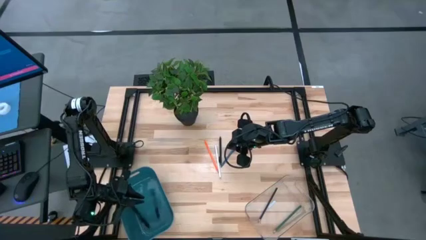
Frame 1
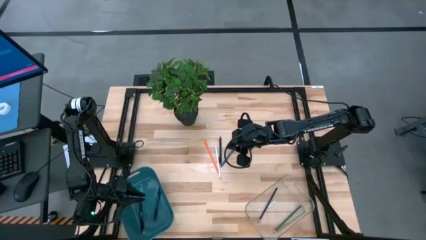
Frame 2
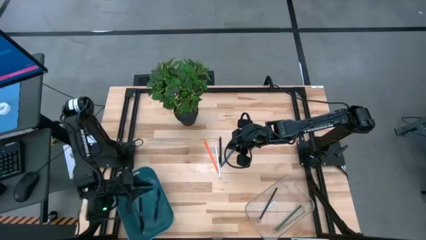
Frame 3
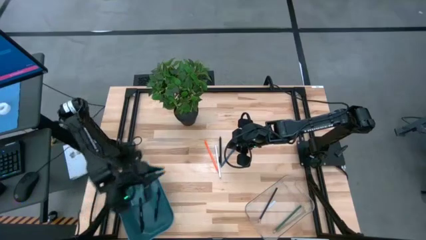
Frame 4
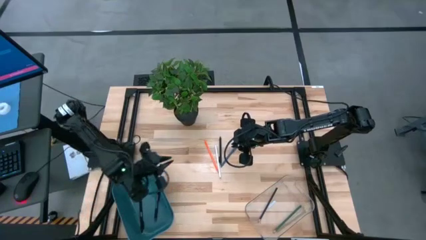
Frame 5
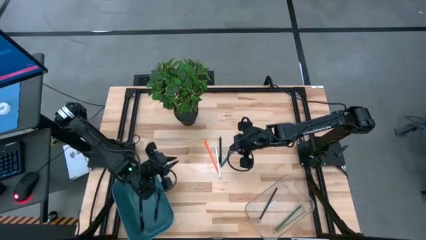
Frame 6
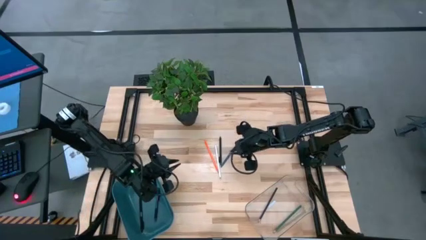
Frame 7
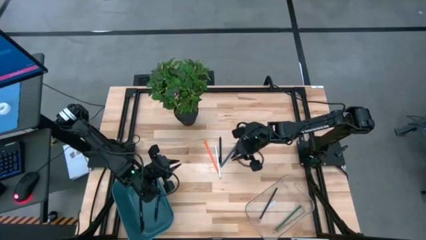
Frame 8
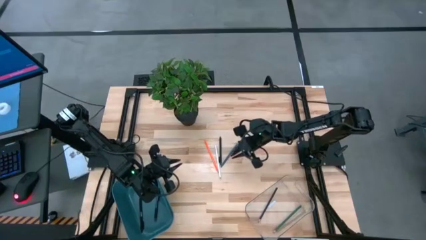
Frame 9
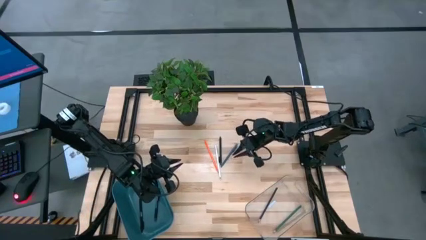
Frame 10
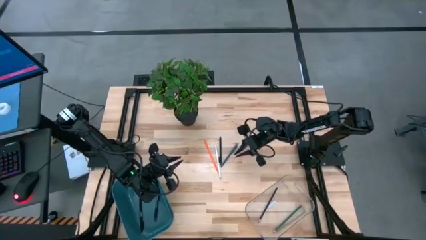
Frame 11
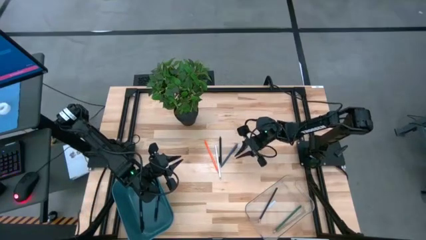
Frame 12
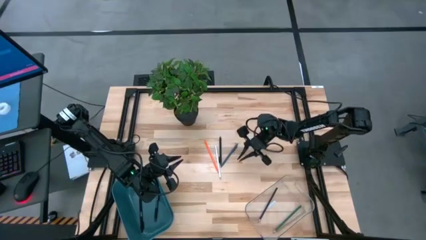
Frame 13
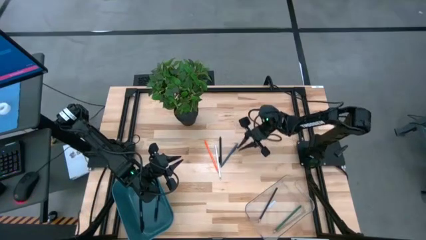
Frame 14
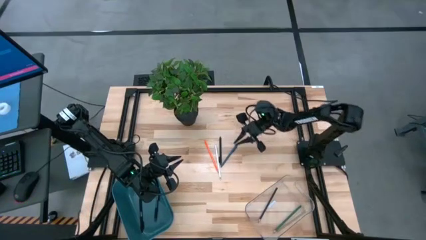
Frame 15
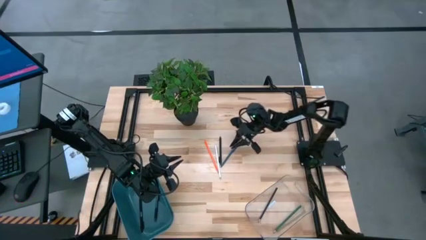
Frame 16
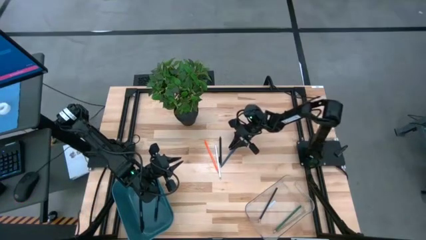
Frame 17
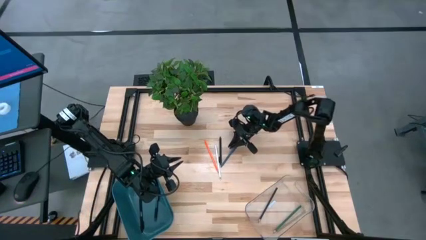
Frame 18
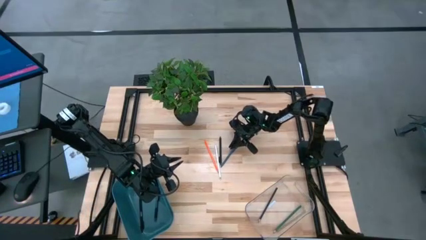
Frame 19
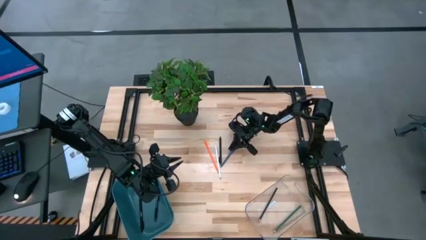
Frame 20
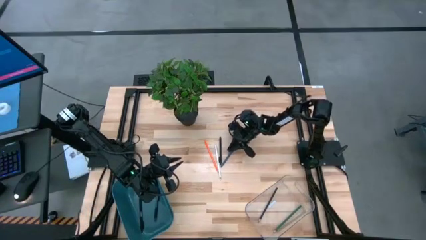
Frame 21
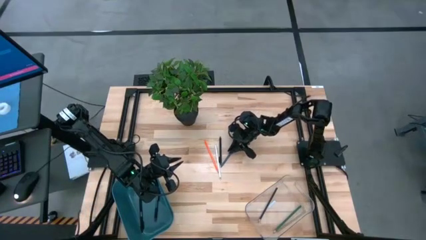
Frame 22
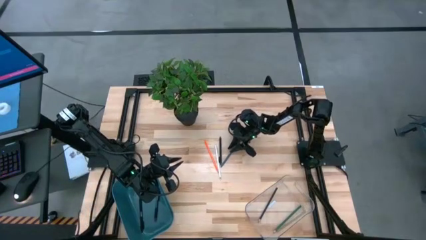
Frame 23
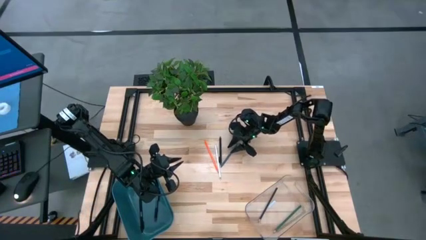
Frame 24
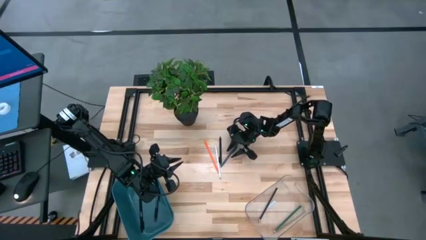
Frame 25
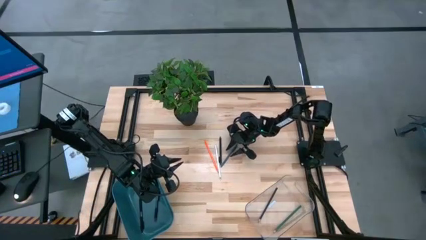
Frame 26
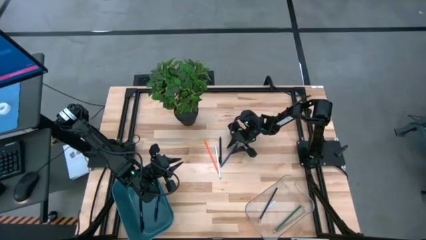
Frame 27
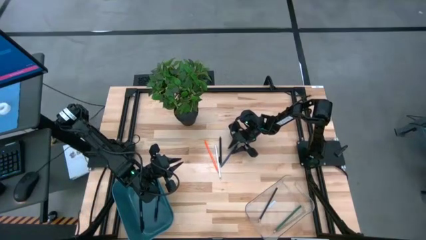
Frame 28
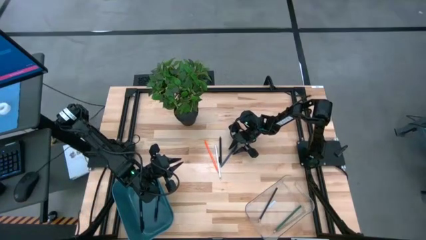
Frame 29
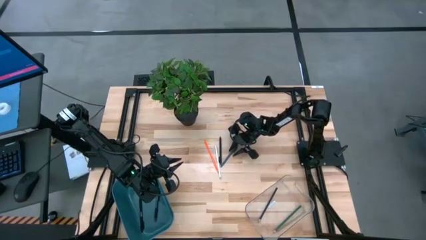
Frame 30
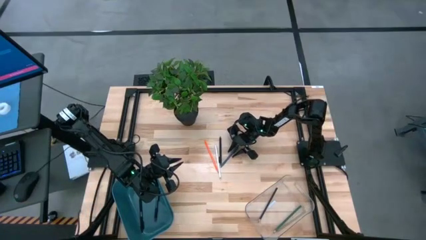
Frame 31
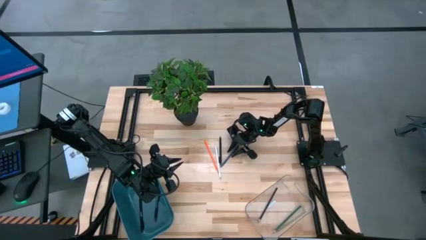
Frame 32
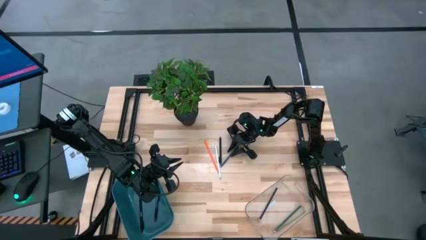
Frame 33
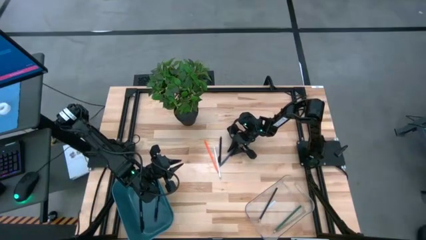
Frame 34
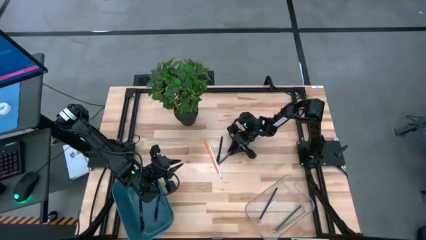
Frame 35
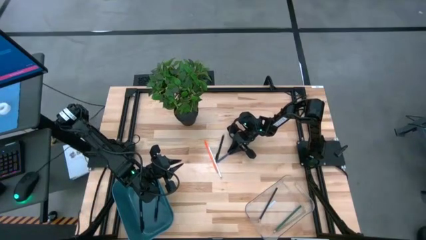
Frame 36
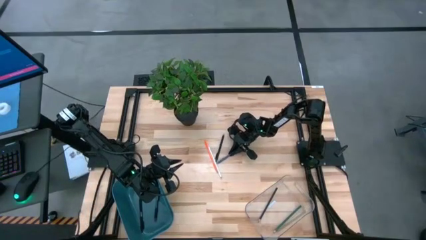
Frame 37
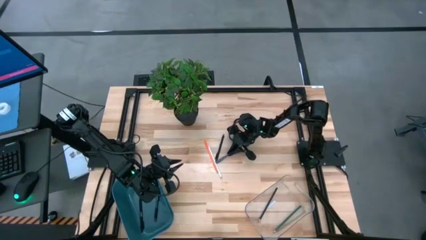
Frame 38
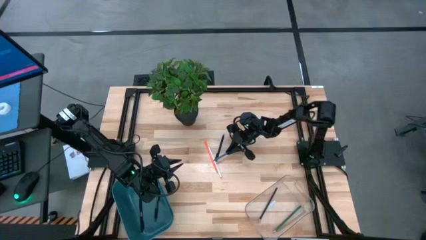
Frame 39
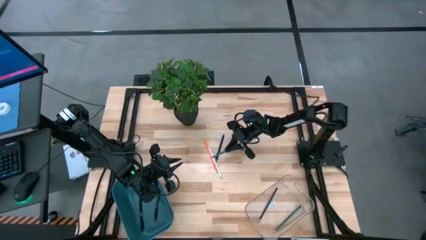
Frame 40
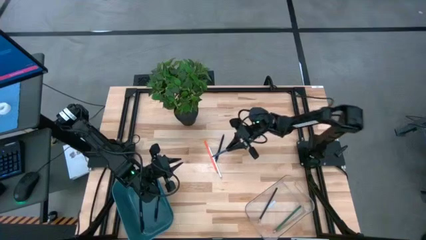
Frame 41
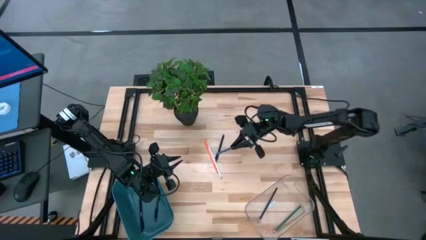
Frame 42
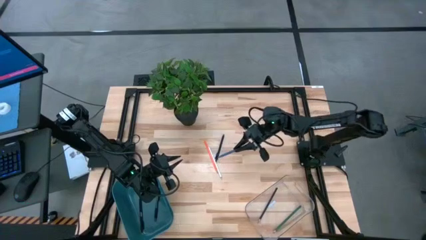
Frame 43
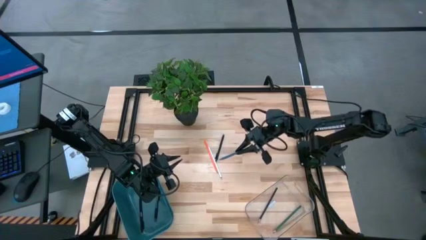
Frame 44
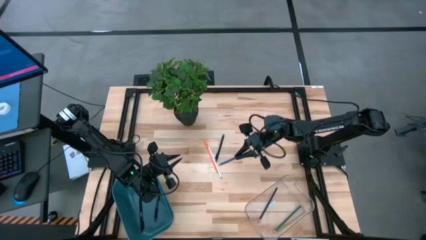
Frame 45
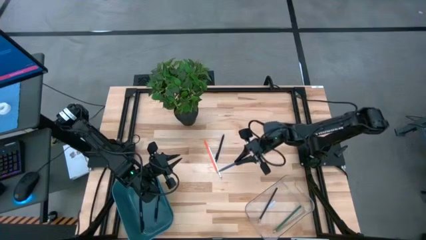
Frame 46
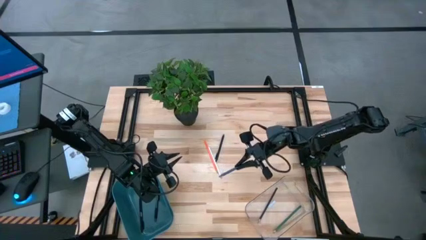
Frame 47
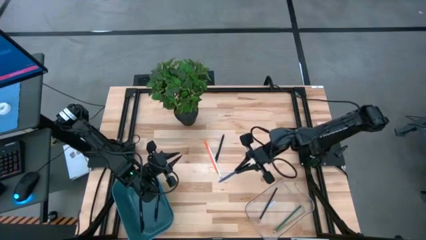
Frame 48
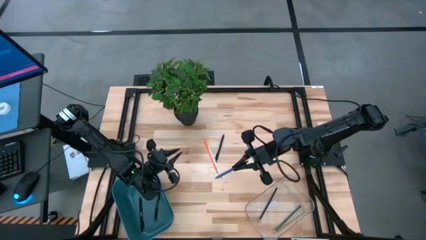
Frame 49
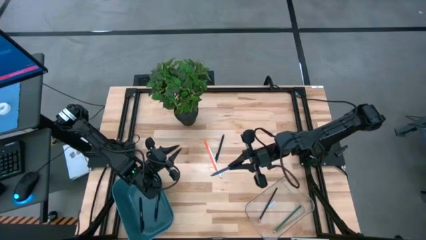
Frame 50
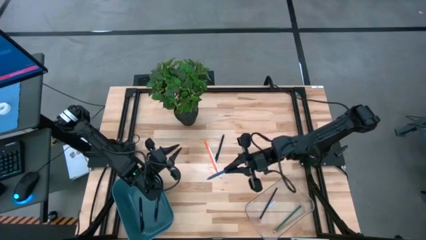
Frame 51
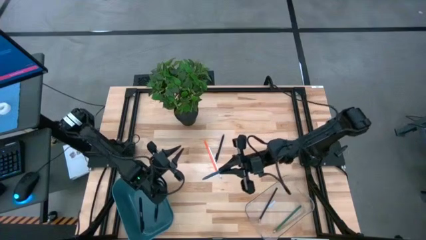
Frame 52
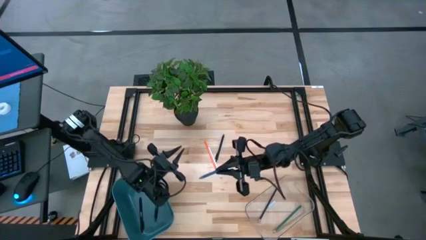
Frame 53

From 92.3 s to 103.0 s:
Task: Sort pens & pencils
Put the blue pen into the blue bin

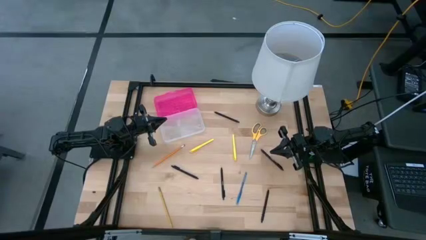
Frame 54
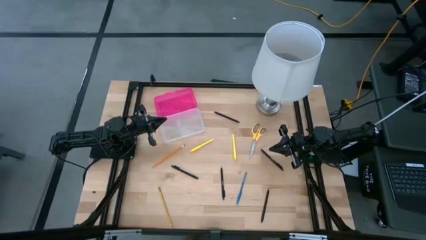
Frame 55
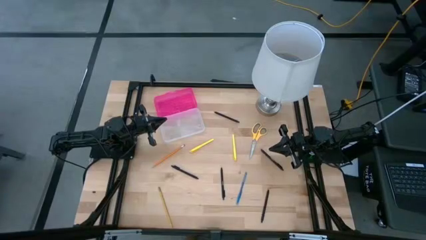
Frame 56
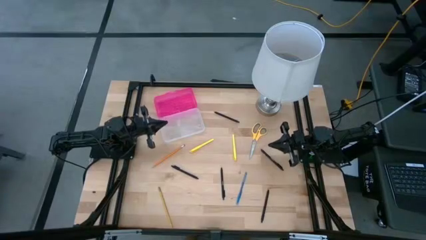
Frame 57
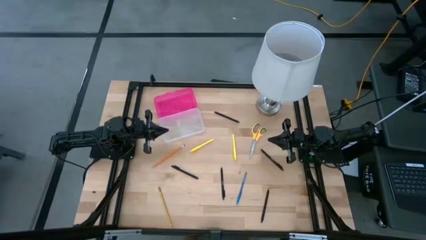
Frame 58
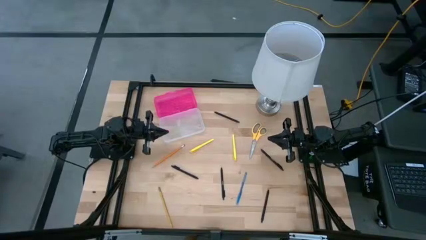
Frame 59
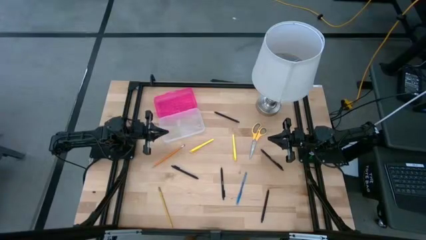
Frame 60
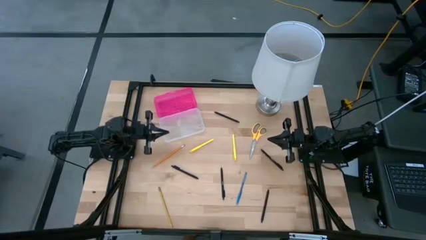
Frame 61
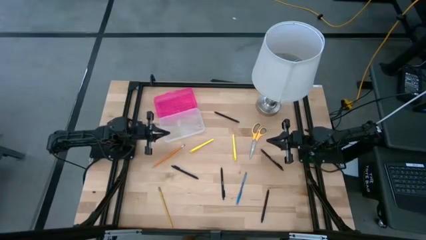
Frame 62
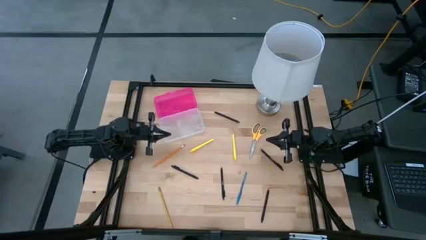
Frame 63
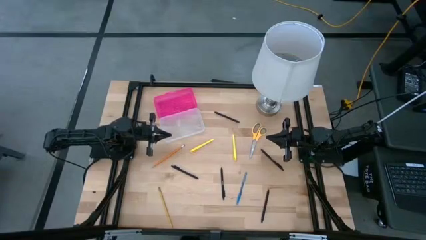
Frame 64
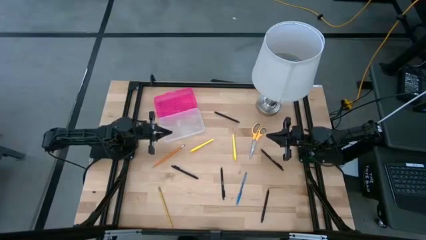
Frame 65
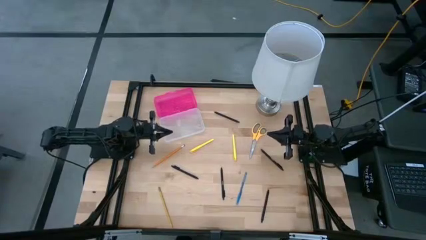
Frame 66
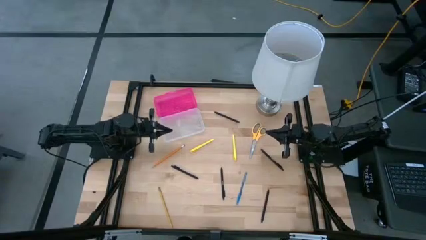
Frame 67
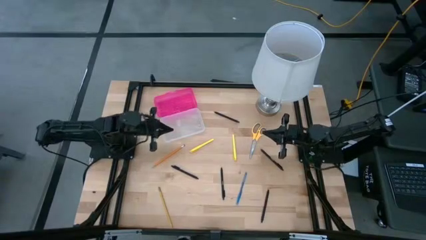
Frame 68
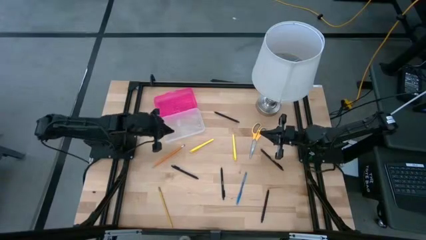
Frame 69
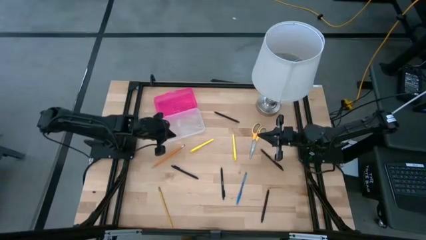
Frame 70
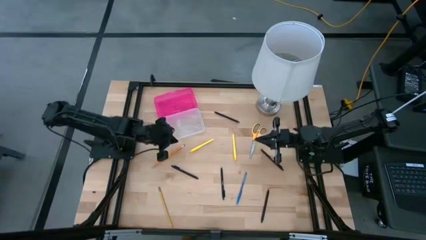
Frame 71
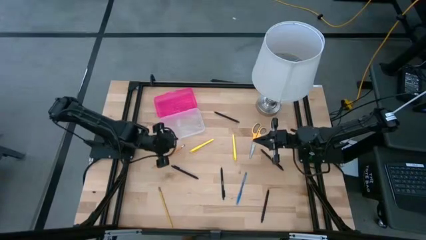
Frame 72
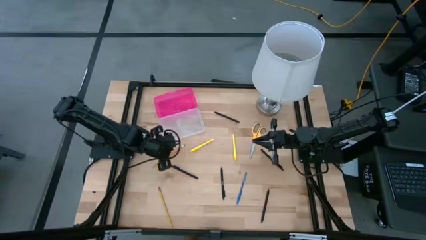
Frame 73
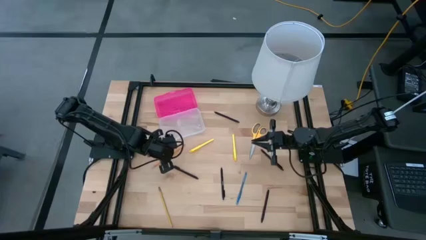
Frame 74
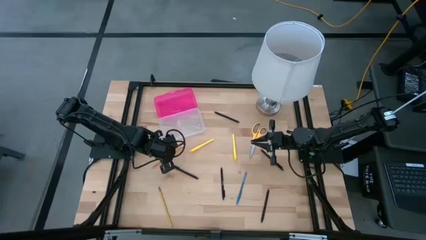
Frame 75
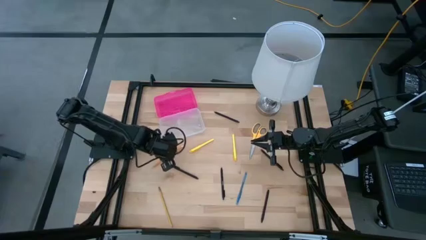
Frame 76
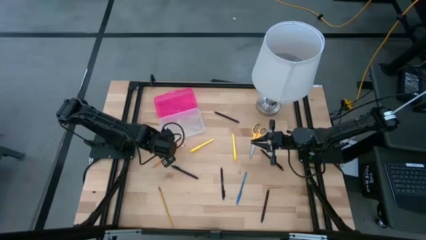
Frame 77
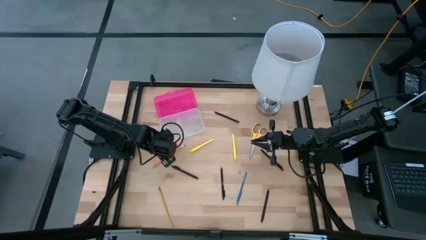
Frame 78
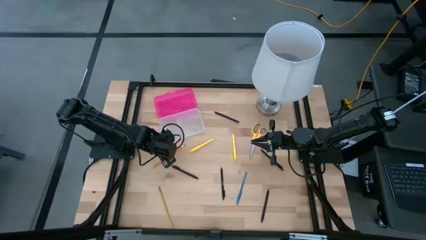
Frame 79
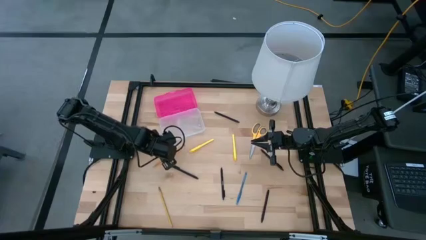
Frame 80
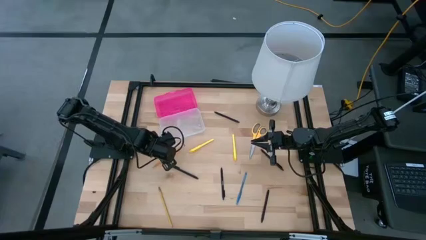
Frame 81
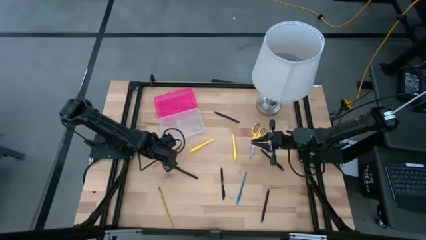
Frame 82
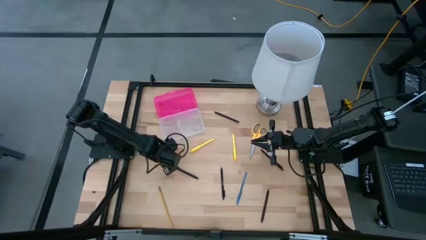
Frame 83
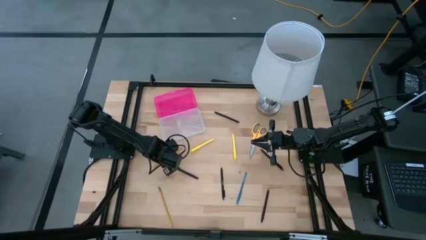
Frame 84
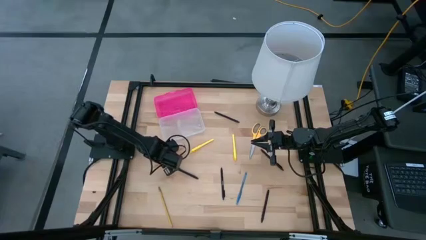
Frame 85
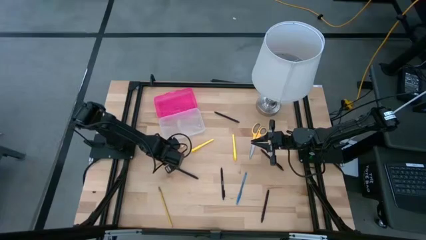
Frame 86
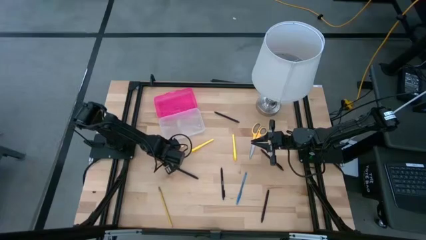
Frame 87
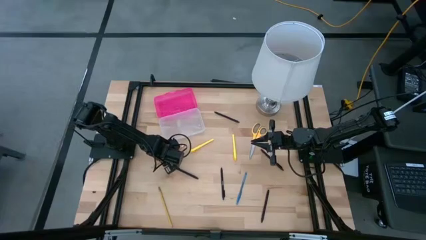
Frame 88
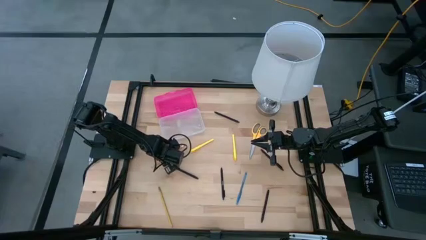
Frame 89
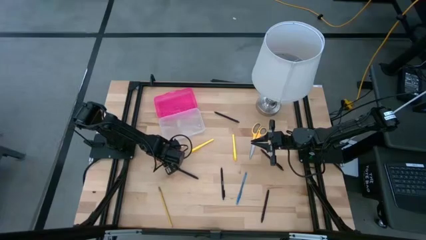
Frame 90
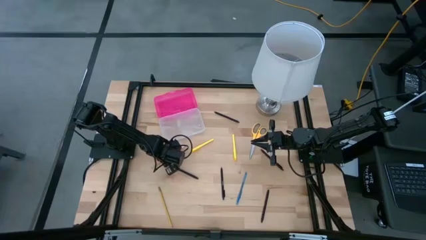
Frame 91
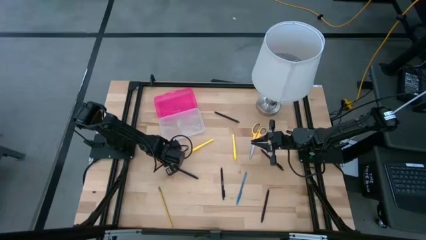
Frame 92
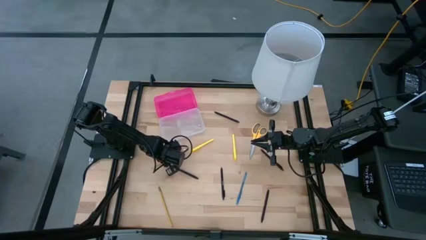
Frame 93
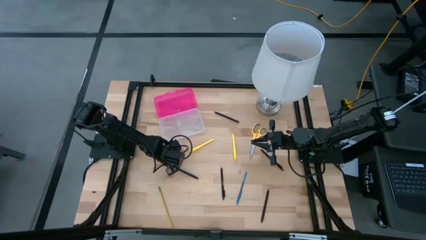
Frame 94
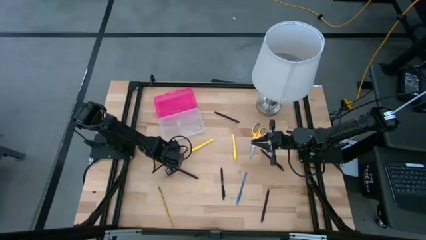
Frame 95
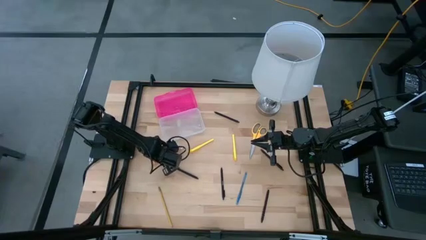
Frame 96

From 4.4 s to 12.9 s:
Task: Pick & place school supplies into a supply box
Put the orange pencil into the pink supply box
